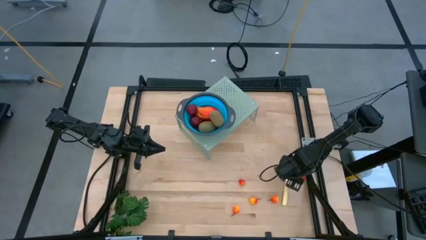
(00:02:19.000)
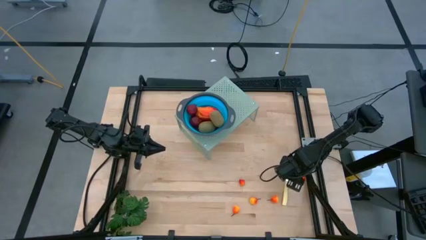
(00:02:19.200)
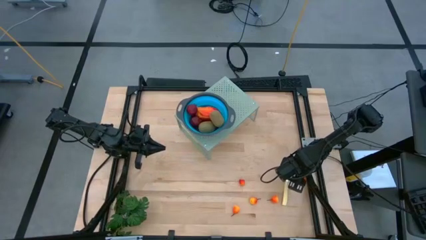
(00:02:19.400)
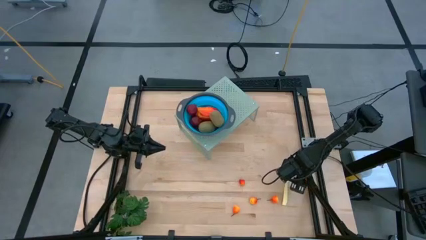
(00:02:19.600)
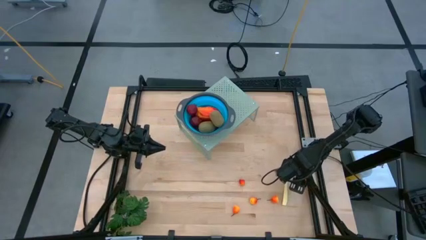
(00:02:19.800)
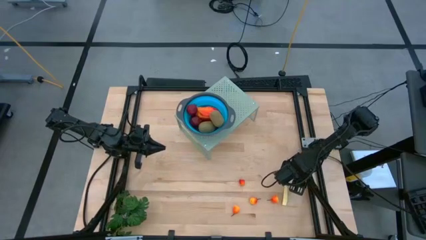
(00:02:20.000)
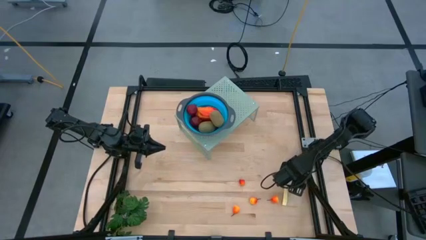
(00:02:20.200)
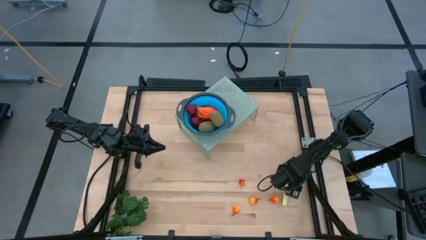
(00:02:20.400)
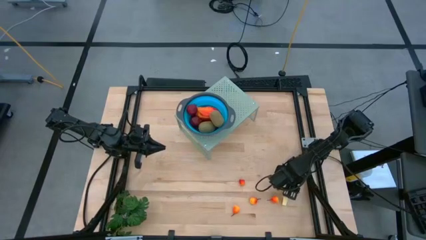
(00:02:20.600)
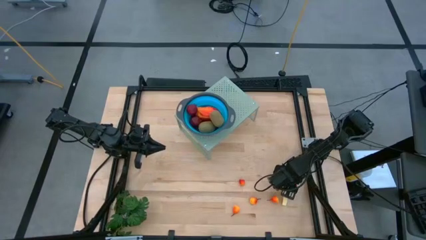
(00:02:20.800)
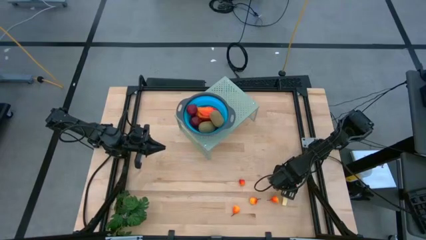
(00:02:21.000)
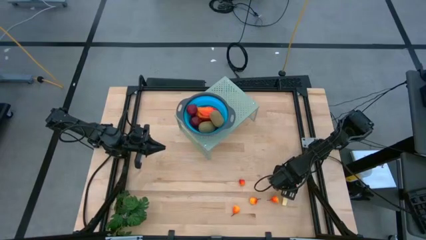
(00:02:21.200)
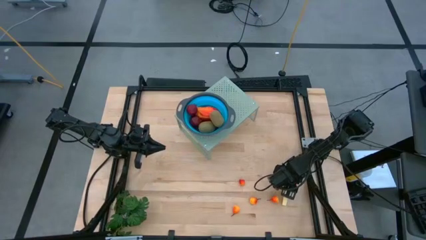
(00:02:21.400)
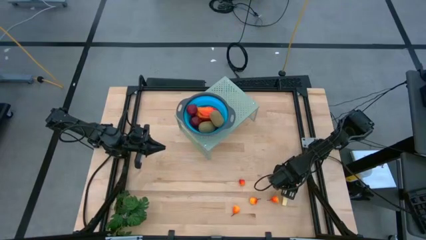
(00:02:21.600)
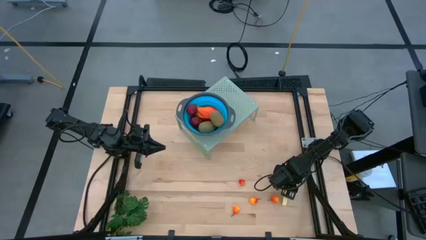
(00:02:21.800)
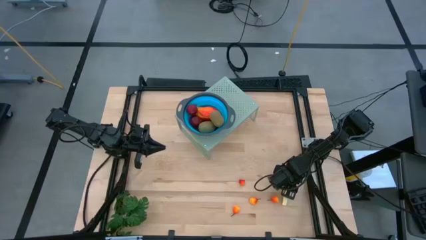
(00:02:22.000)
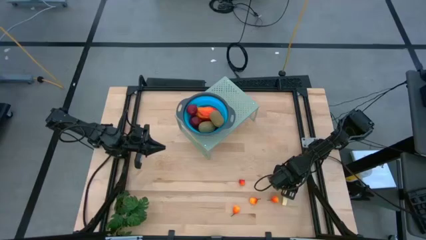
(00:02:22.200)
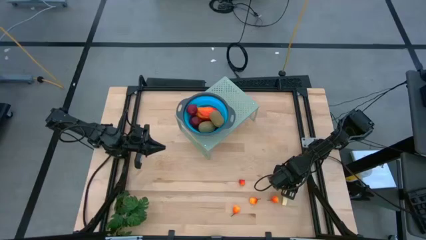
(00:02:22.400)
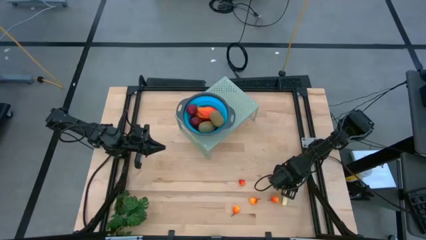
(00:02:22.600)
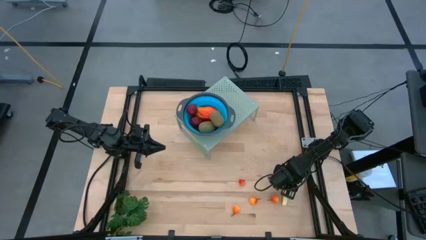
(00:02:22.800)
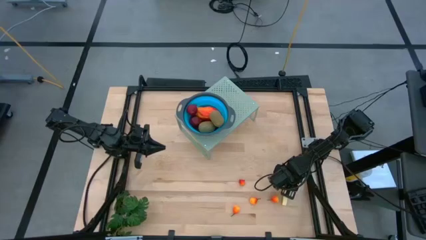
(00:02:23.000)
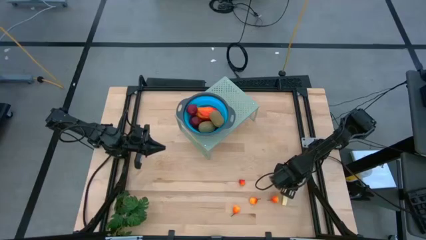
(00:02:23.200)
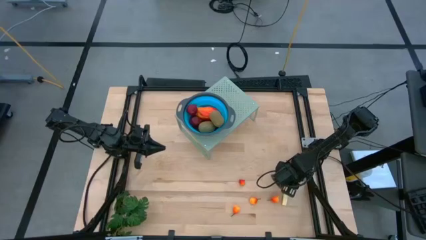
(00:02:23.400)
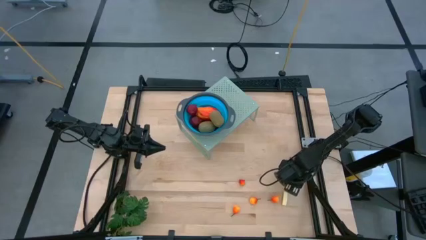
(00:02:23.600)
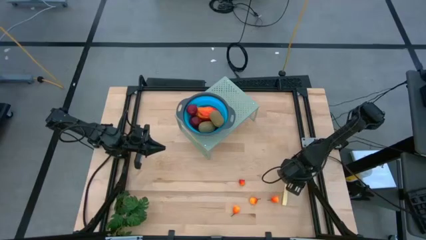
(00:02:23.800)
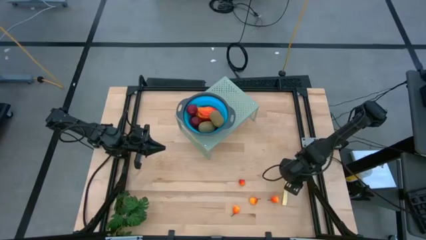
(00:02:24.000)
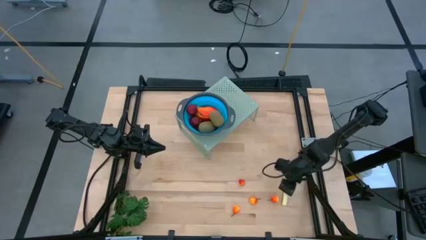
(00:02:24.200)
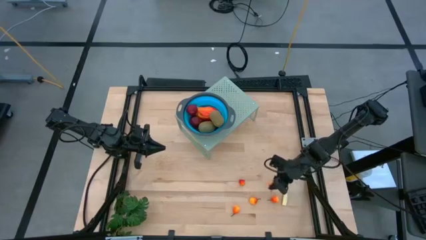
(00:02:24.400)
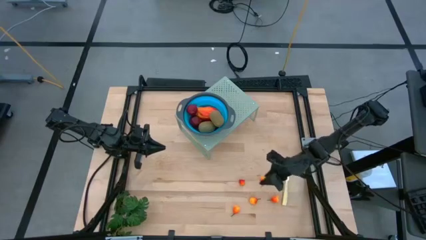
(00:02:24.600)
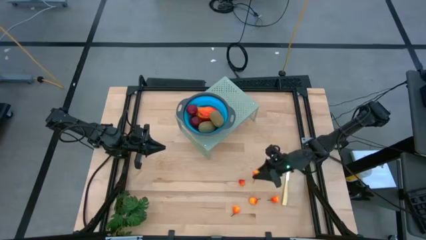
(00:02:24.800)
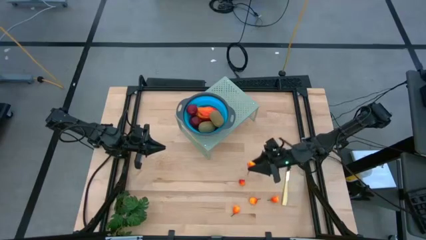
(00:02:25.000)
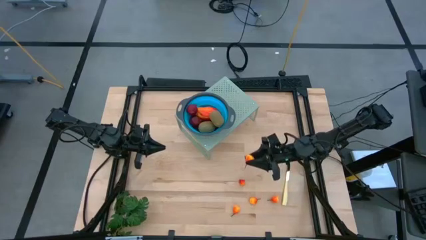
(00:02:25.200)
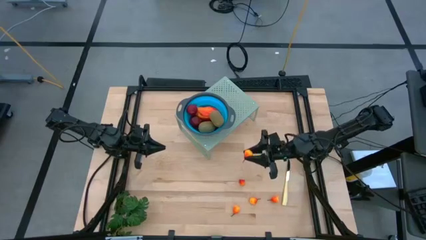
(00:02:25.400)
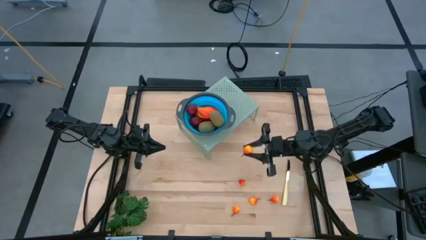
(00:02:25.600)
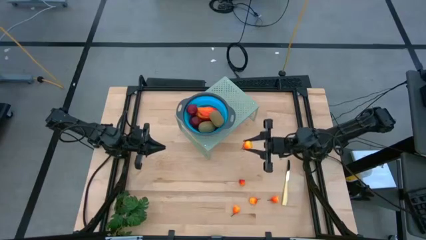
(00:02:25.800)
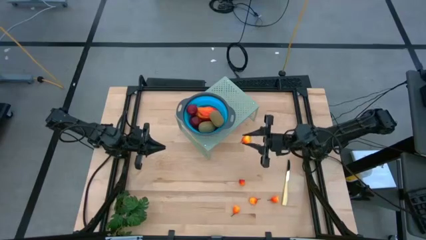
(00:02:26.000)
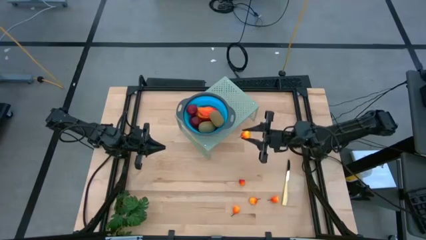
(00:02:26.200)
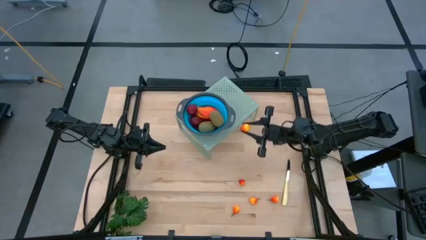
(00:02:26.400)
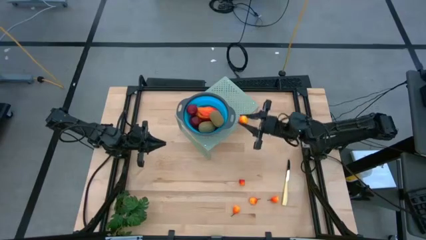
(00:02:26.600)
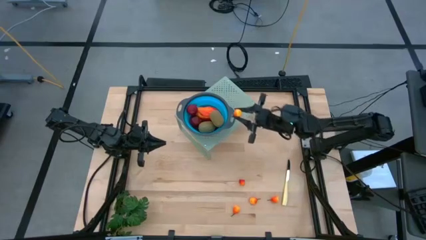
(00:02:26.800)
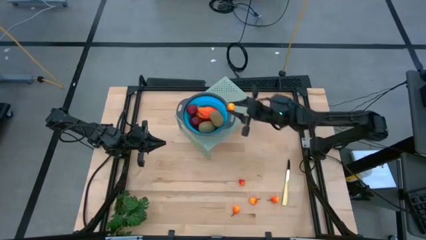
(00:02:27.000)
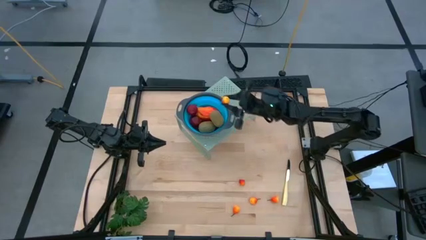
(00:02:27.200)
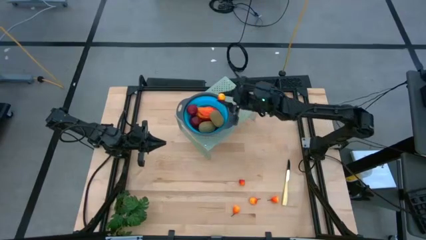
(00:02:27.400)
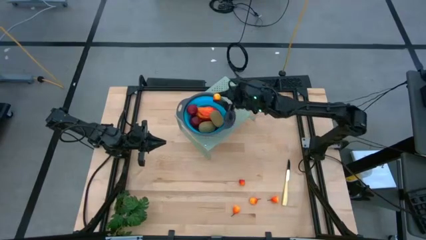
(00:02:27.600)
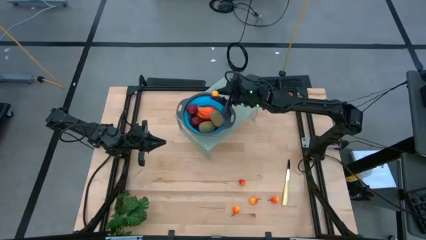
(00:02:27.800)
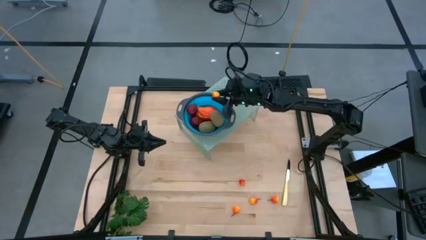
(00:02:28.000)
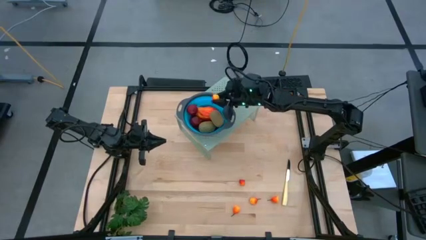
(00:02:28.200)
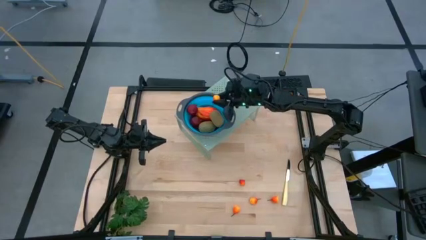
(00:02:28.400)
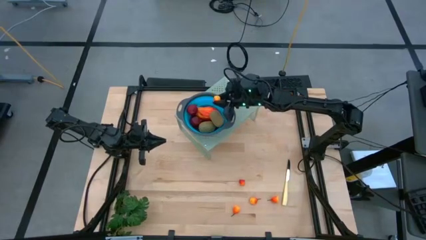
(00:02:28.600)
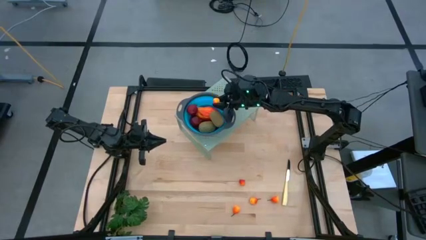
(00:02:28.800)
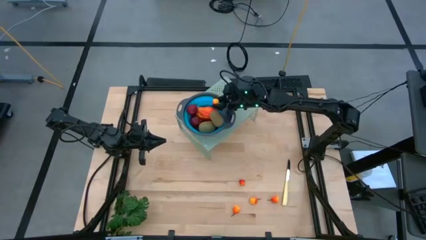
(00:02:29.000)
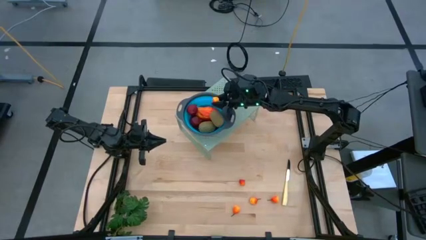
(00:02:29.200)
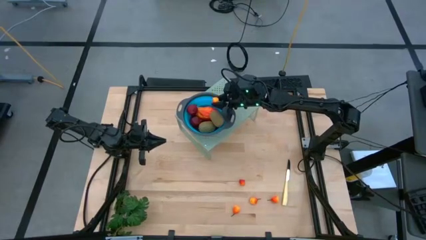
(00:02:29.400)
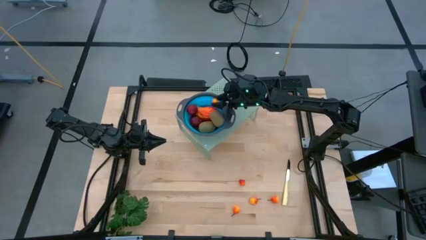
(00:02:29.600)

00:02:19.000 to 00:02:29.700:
Task: Pick & Place Fruit
Put the peach into the collapsible colander on the shelf
